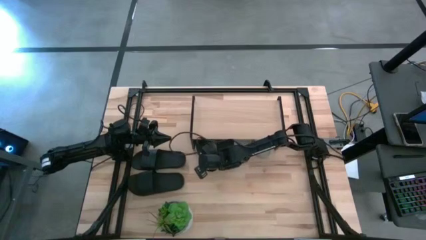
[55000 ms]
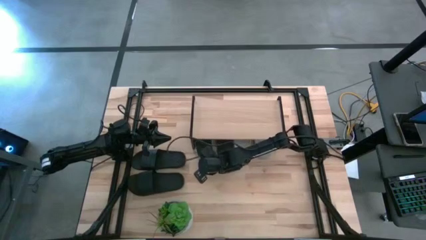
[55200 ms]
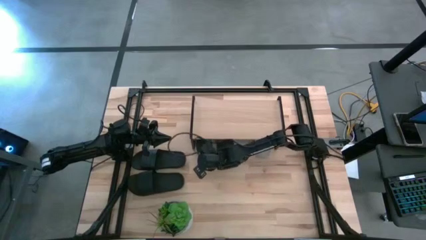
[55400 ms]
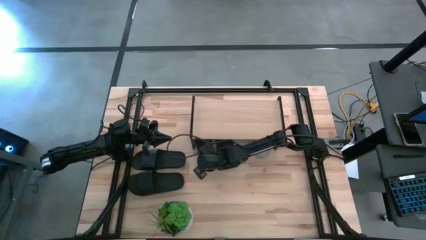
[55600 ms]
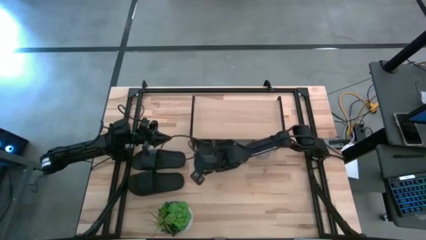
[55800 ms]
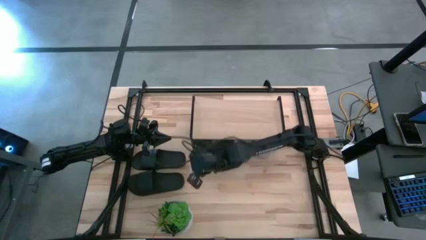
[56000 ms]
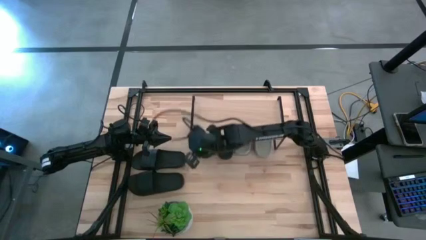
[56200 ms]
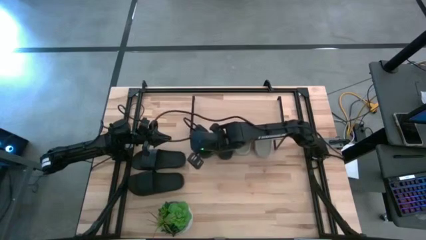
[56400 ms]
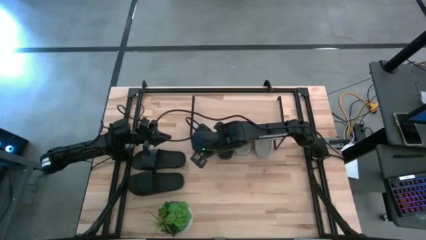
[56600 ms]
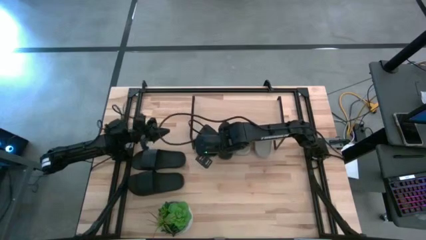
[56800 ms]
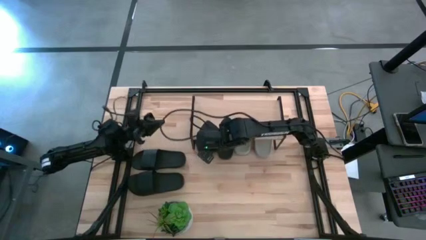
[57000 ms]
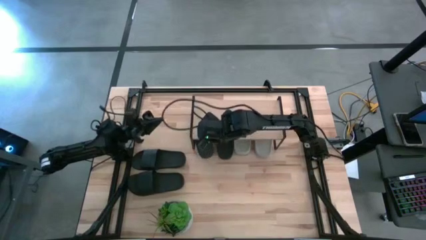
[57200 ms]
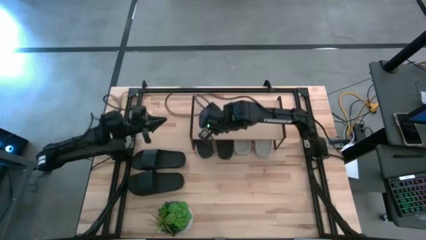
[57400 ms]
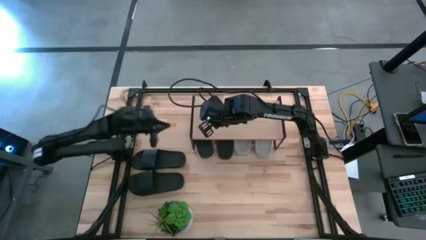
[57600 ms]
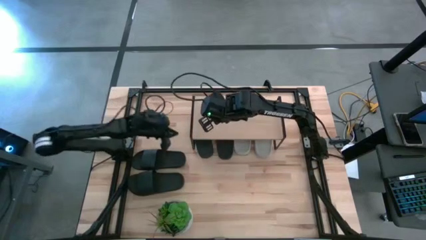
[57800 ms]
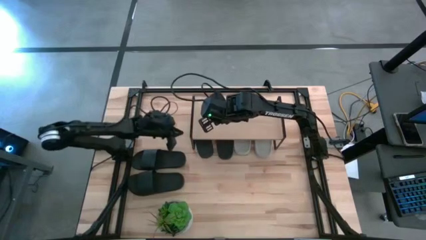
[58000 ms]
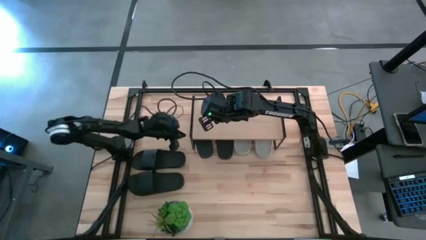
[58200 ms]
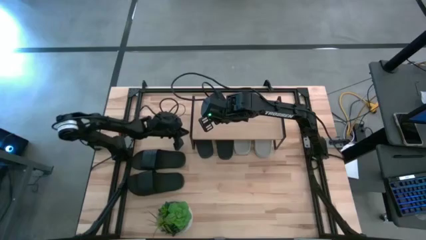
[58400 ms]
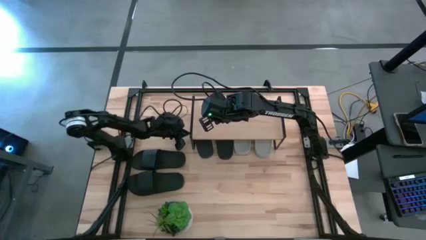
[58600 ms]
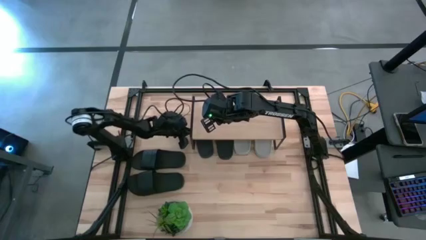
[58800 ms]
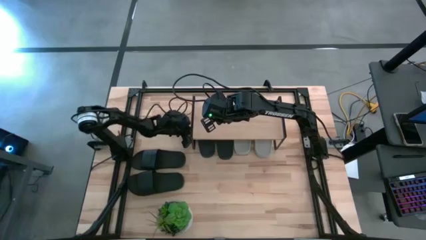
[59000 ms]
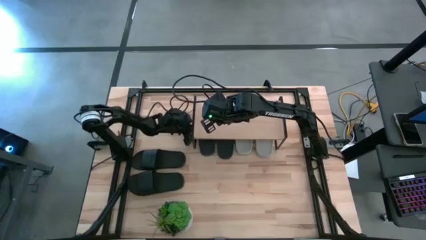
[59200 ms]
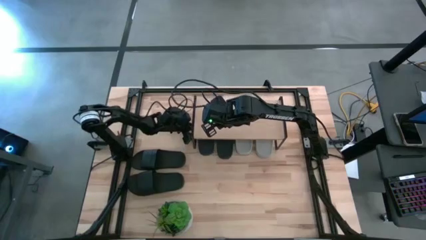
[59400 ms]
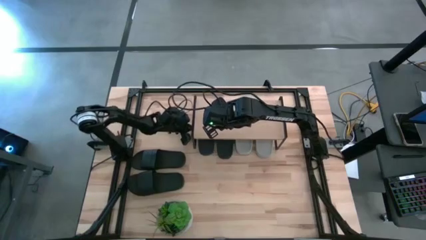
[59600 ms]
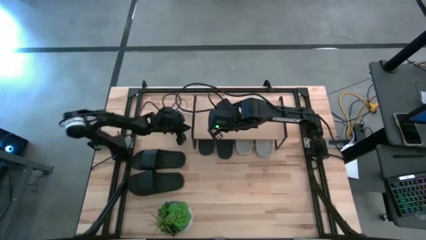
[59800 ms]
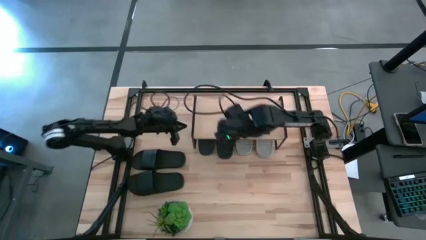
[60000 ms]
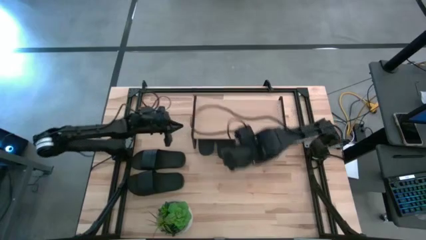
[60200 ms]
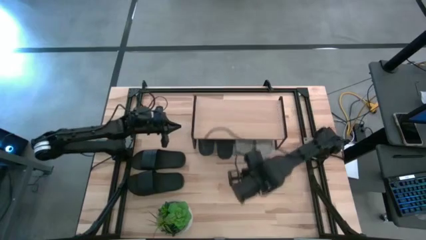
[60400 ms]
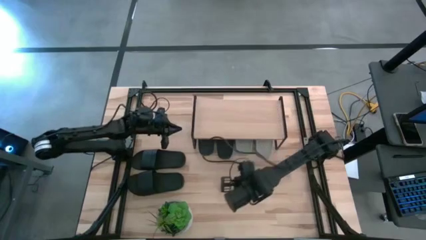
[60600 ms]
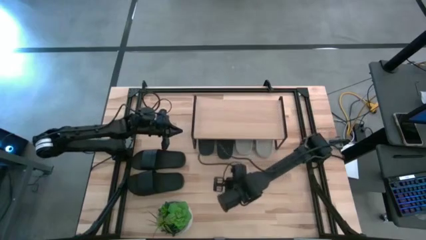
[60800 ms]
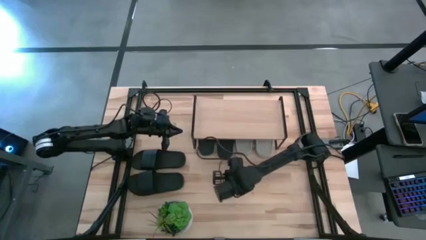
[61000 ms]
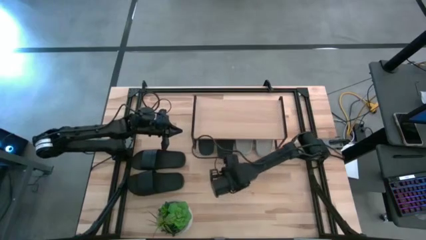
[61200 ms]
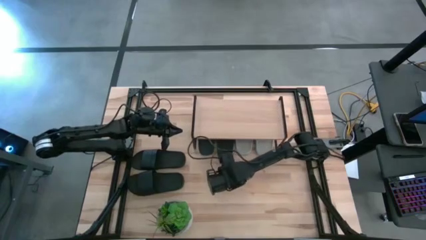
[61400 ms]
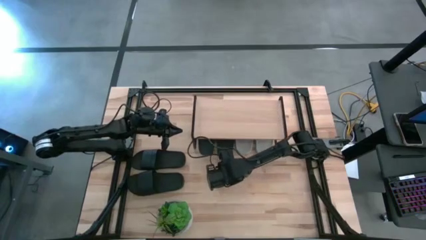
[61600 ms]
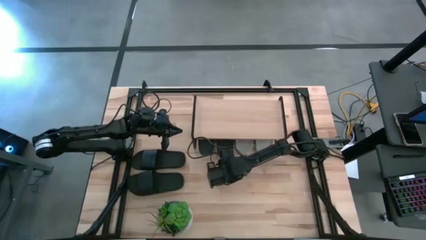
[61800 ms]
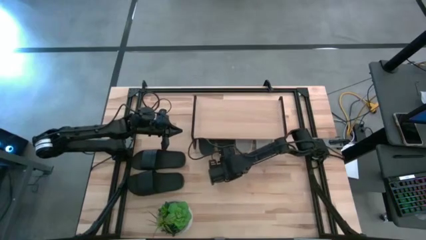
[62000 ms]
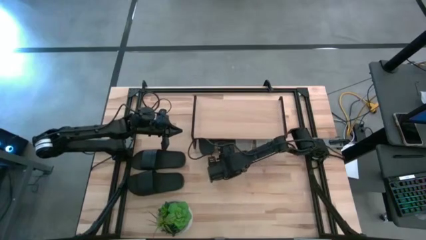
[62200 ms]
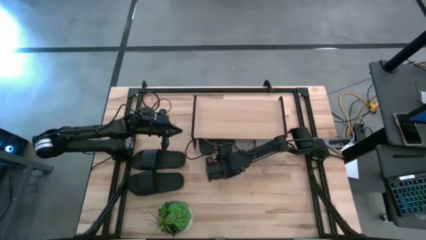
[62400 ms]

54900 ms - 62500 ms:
Task: Pick and place slides into the shelf
Adjust the black slippers under the shelf

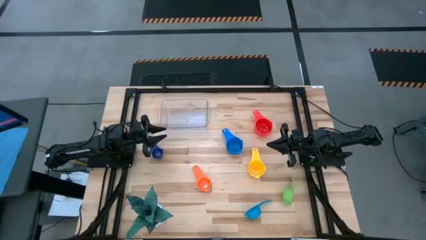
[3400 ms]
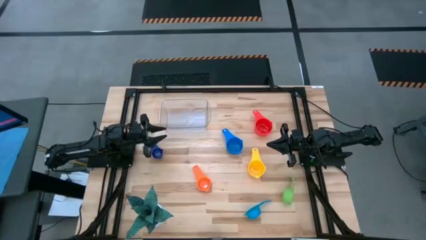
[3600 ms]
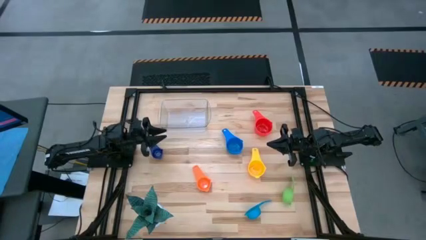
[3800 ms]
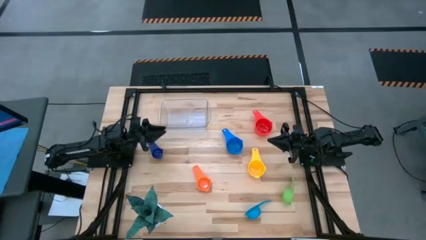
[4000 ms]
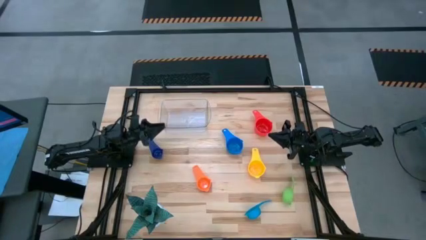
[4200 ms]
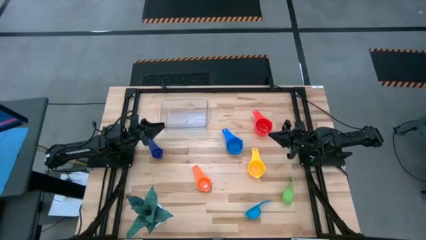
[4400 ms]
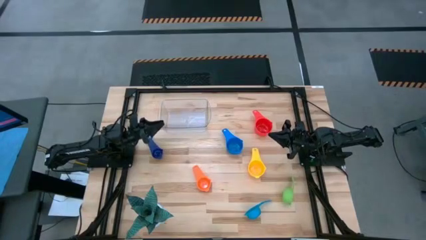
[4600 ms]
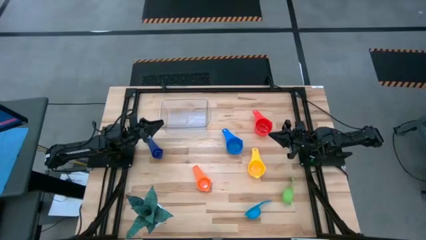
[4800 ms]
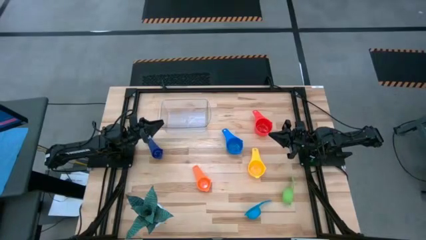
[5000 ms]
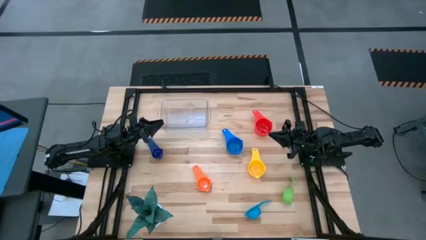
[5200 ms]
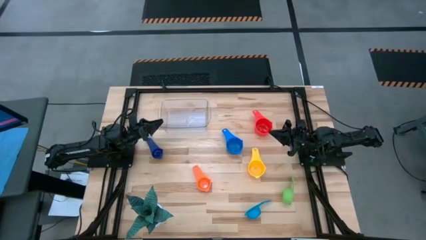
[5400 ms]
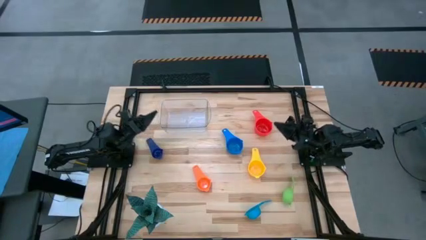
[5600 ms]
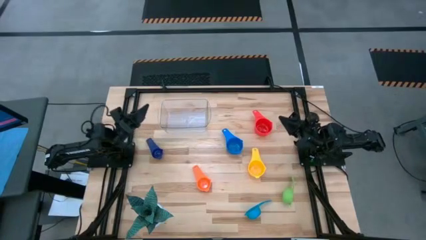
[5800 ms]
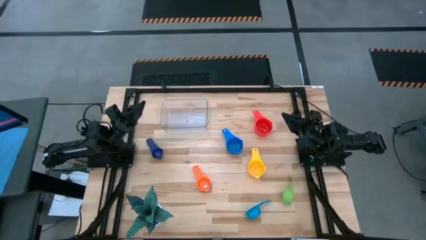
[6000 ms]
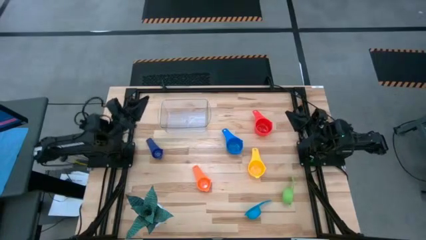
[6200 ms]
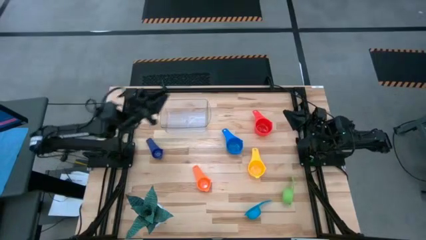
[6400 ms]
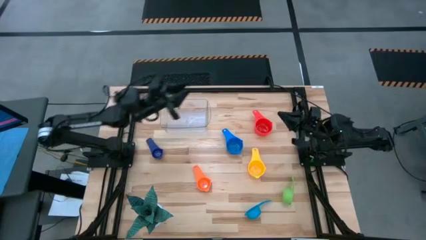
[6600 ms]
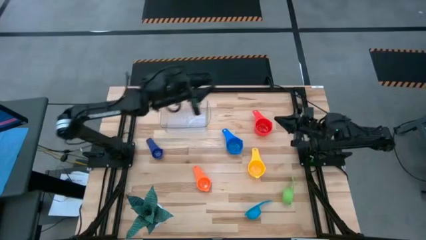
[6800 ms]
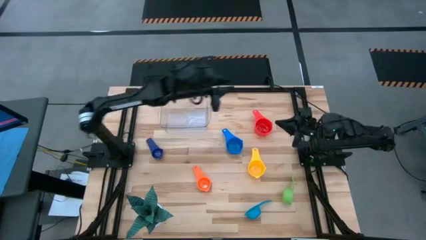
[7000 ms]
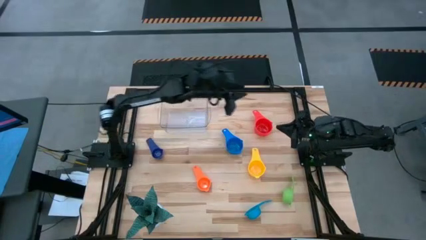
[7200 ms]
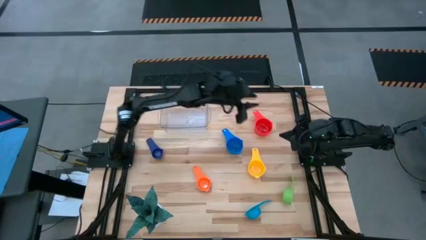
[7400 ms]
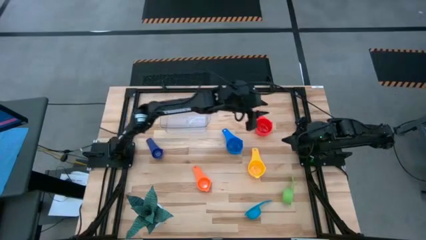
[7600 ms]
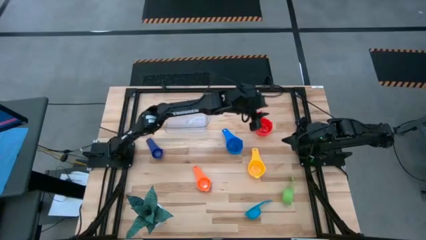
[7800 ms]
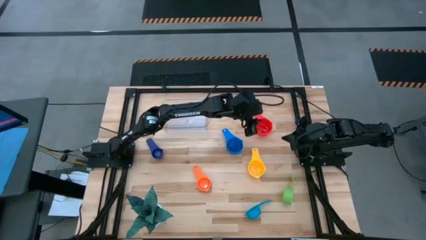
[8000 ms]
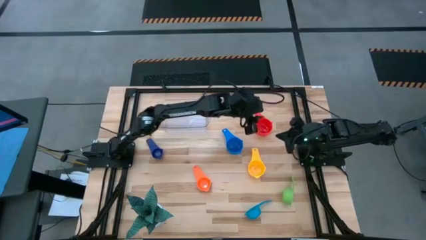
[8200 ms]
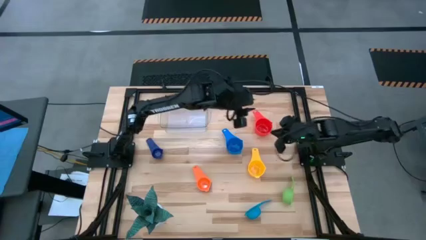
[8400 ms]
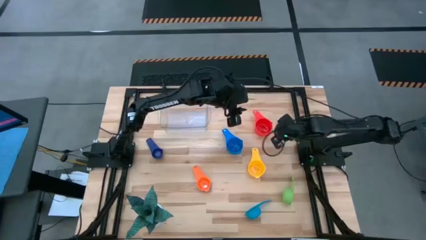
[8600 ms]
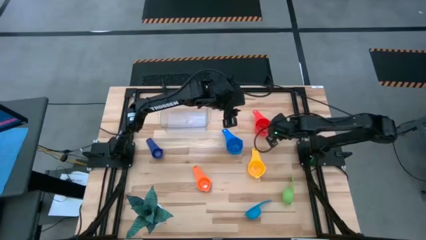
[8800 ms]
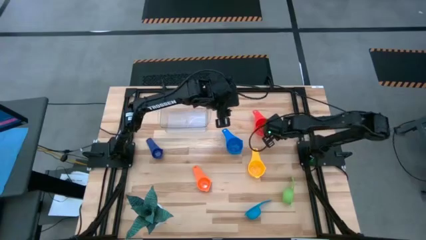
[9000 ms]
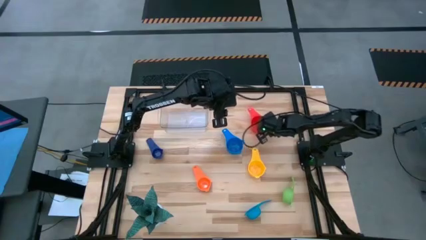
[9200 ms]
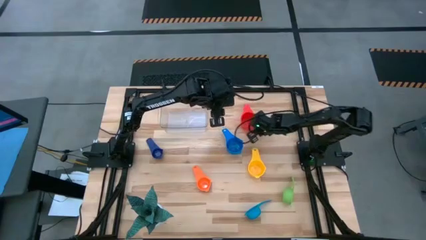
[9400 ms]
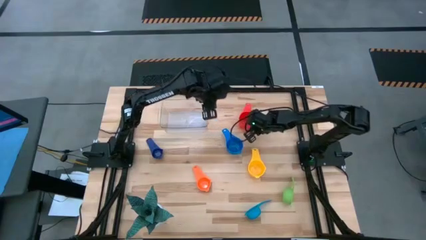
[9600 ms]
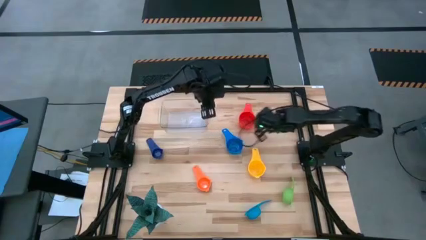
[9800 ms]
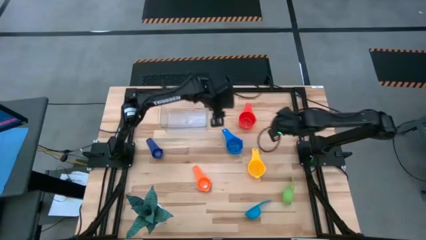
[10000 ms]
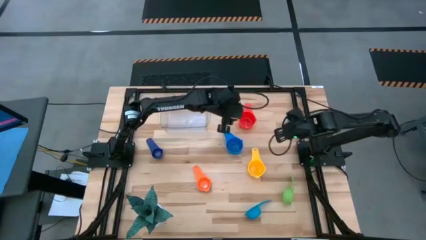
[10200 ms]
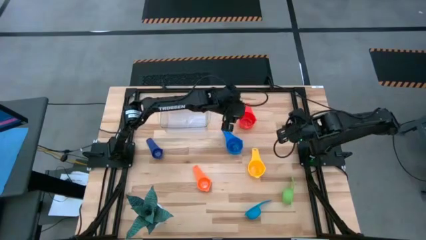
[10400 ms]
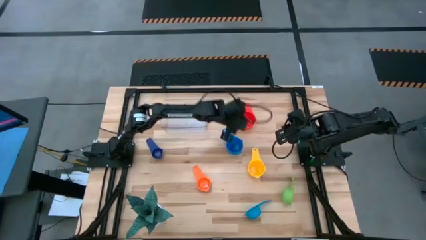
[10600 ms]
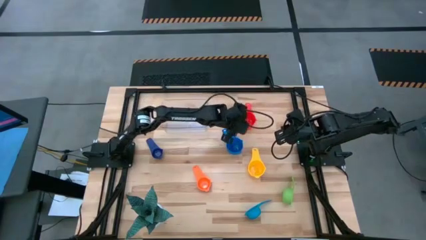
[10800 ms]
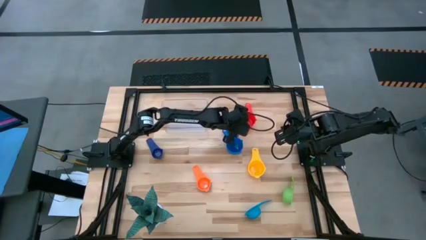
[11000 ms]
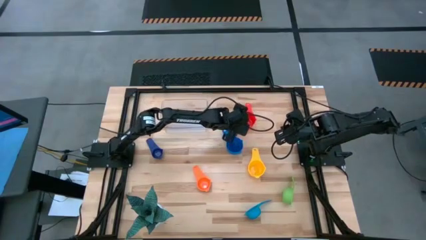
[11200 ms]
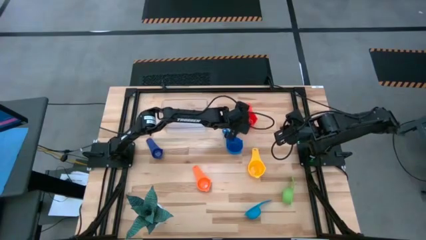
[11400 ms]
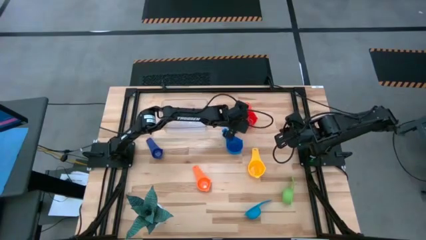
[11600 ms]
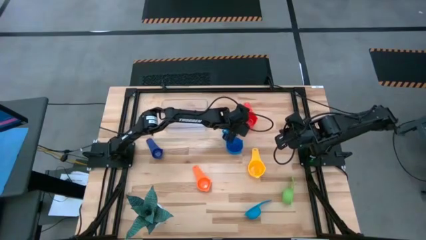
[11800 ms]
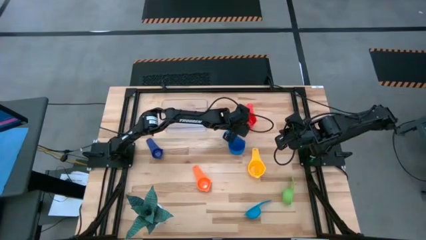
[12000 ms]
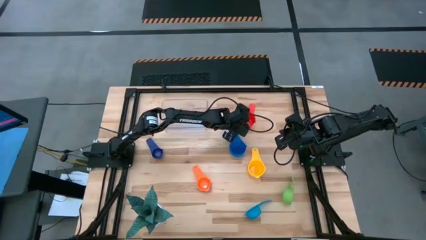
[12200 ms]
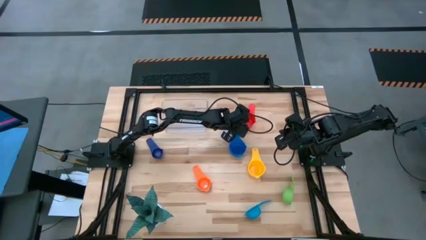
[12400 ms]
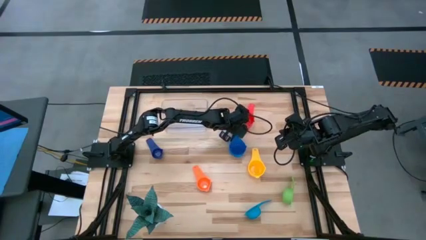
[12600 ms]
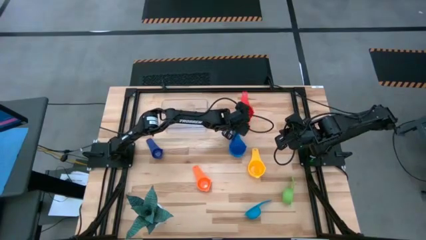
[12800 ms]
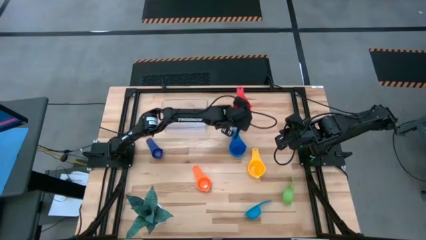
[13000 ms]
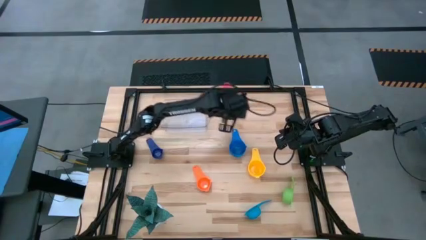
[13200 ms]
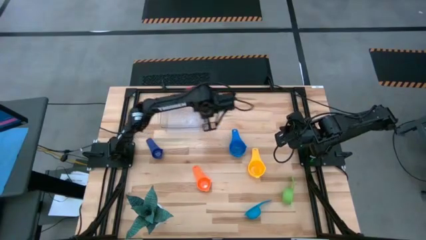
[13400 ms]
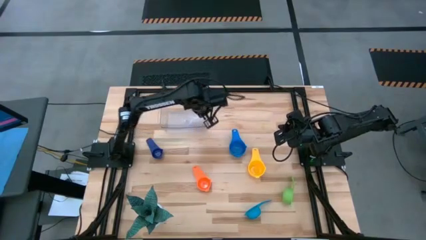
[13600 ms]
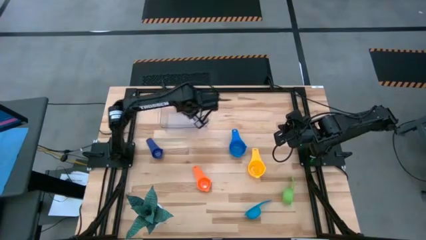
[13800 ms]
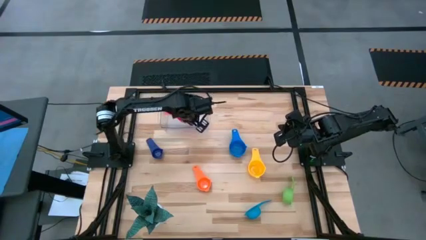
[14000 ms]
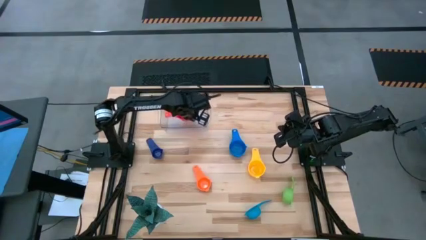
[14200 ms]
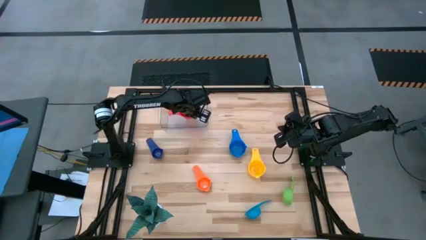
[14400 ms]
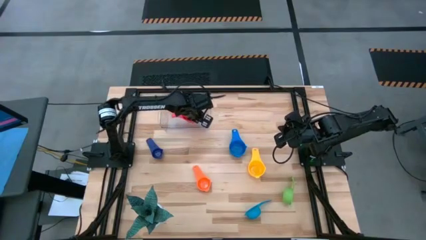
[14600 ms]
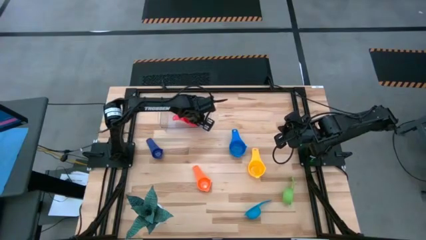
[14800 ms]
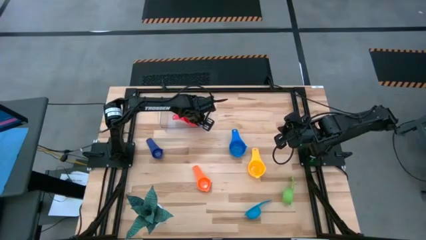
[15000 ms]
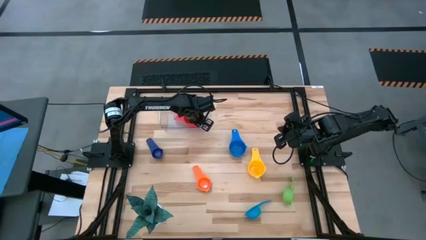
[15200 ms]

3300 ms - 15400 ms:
Task: Nest measuring cups in basket
Put the red measuring cup into the transparent bin
